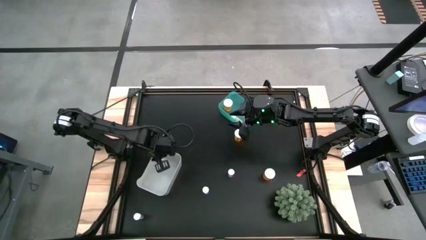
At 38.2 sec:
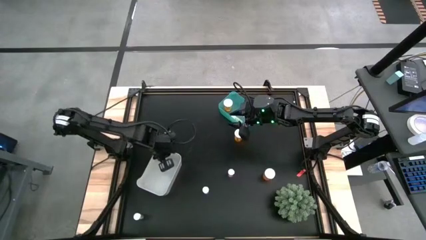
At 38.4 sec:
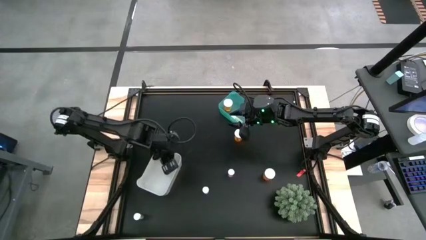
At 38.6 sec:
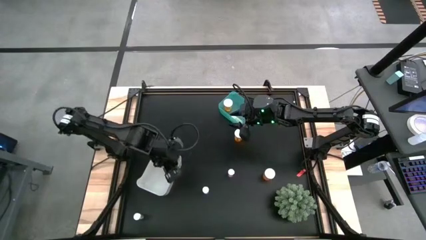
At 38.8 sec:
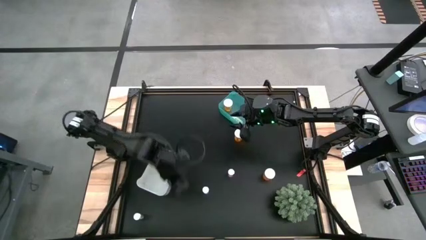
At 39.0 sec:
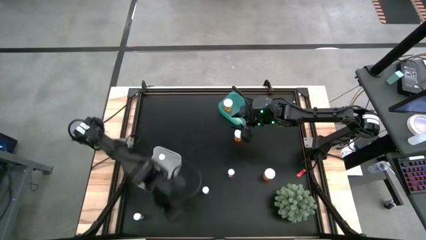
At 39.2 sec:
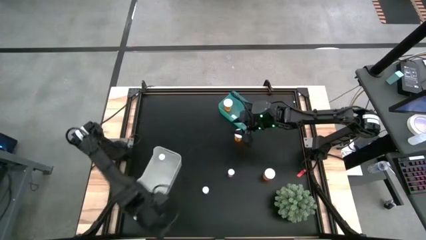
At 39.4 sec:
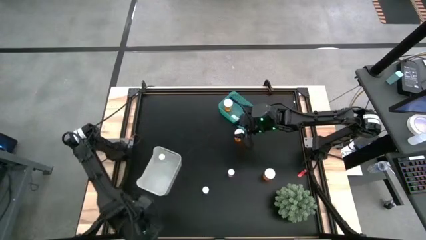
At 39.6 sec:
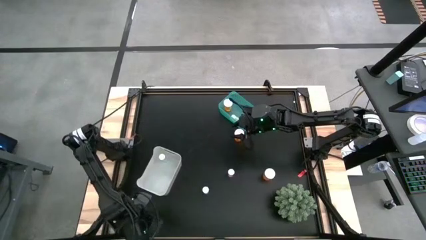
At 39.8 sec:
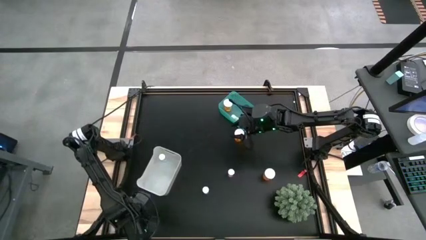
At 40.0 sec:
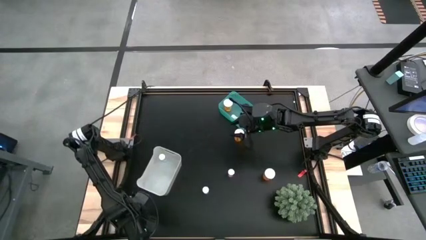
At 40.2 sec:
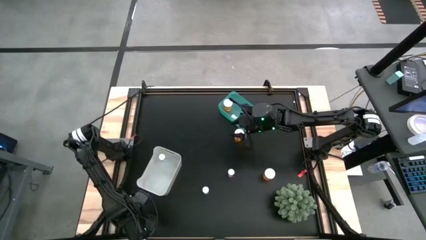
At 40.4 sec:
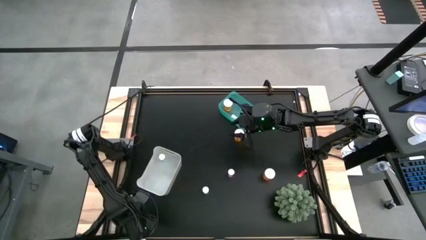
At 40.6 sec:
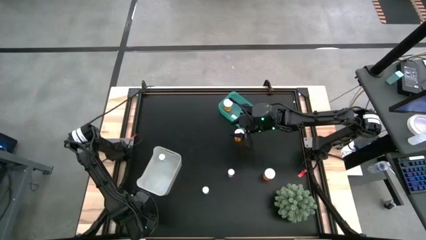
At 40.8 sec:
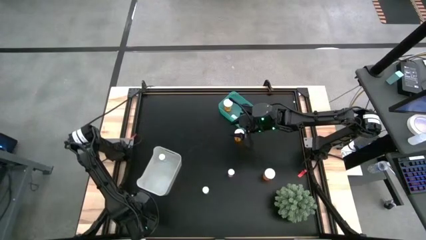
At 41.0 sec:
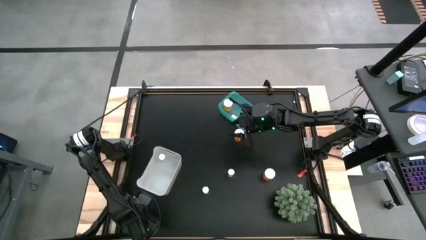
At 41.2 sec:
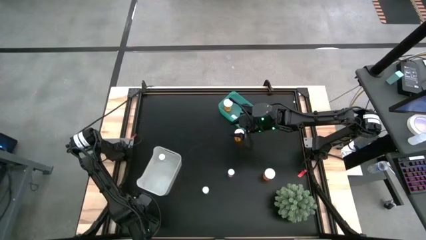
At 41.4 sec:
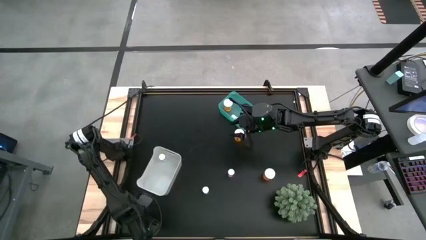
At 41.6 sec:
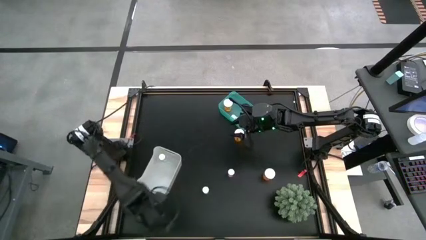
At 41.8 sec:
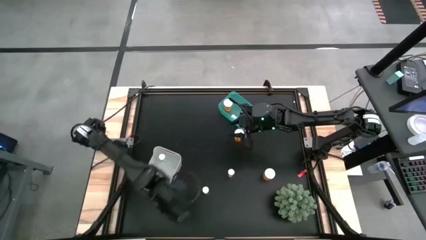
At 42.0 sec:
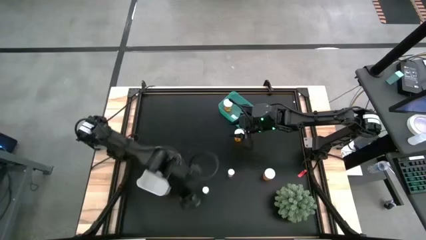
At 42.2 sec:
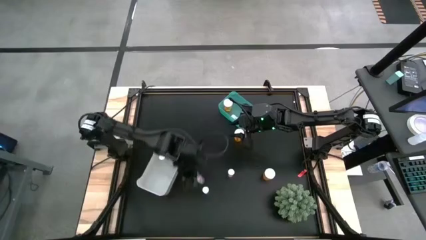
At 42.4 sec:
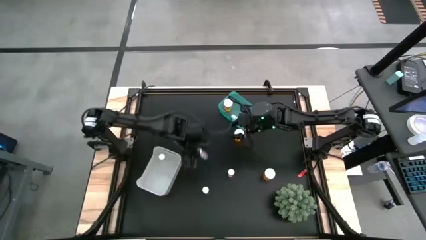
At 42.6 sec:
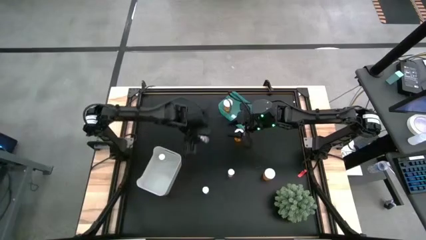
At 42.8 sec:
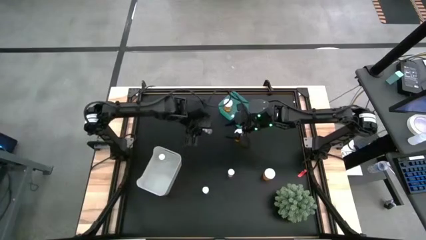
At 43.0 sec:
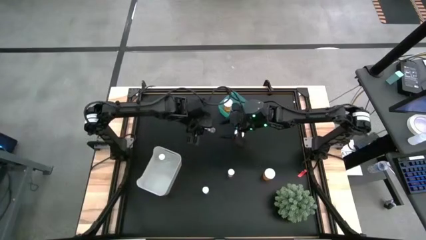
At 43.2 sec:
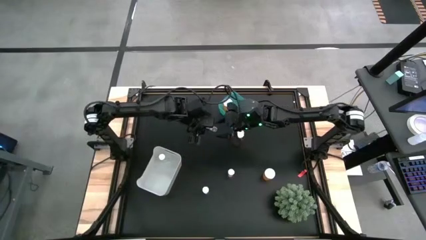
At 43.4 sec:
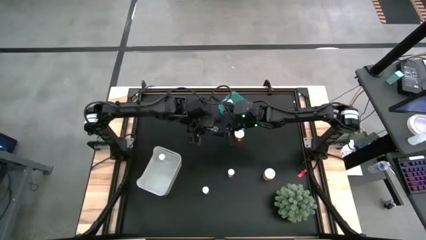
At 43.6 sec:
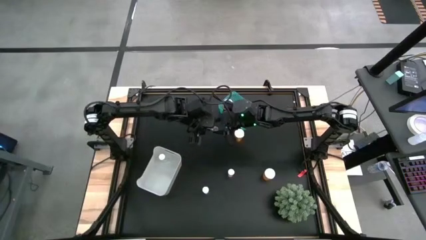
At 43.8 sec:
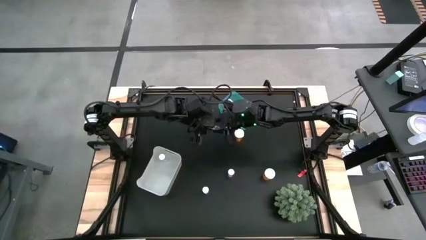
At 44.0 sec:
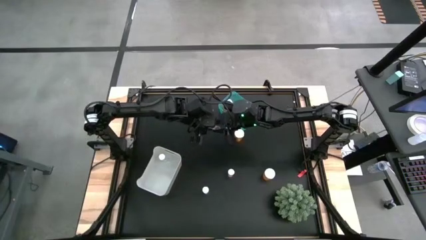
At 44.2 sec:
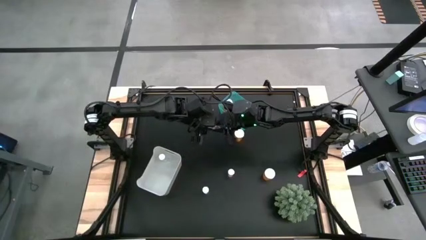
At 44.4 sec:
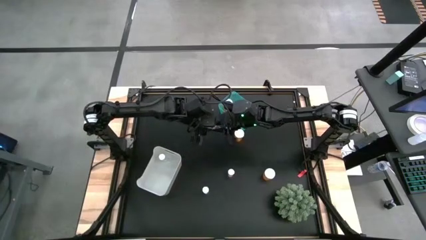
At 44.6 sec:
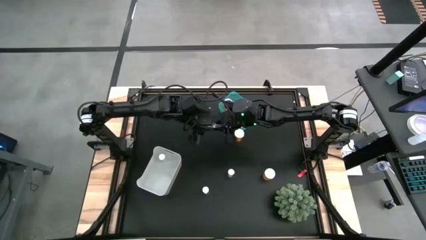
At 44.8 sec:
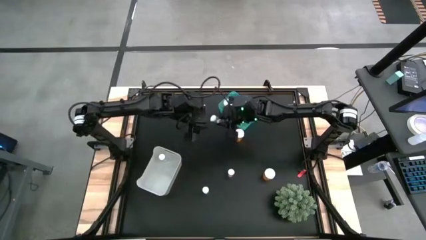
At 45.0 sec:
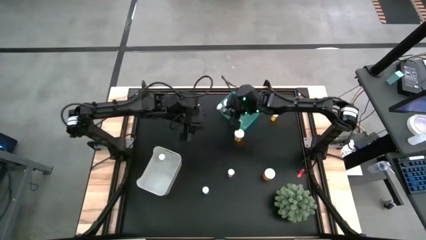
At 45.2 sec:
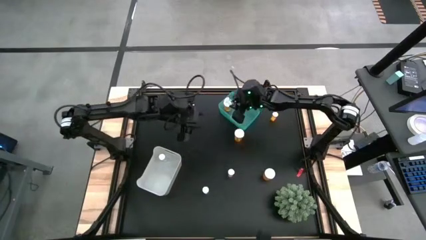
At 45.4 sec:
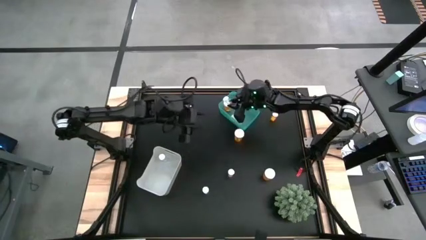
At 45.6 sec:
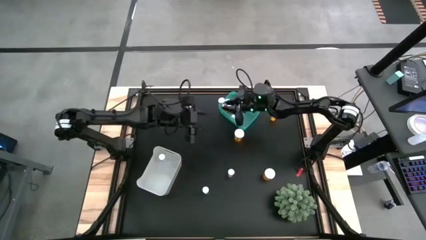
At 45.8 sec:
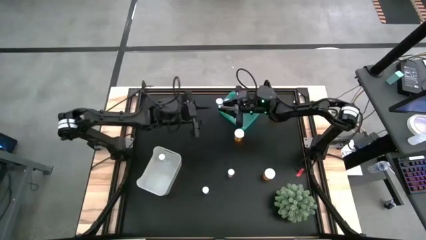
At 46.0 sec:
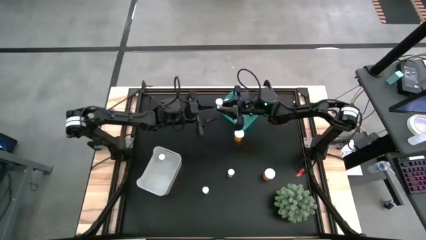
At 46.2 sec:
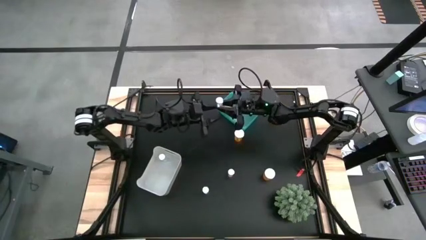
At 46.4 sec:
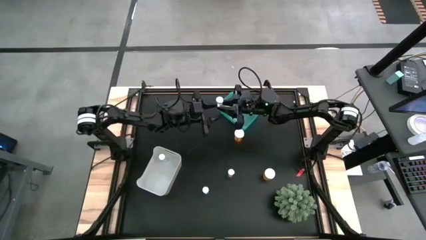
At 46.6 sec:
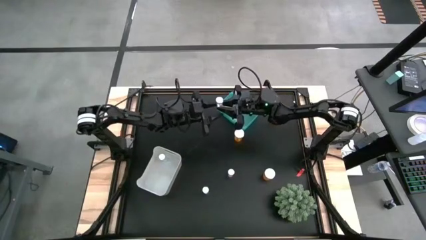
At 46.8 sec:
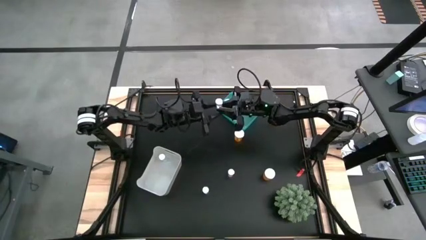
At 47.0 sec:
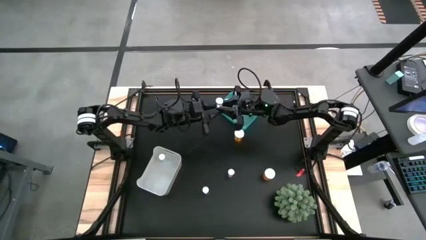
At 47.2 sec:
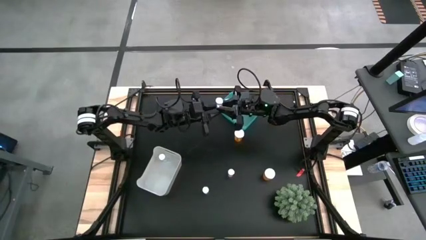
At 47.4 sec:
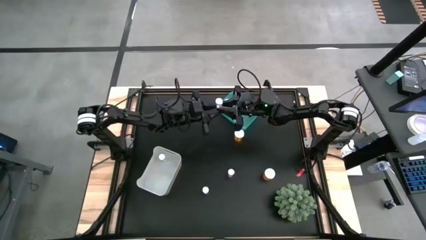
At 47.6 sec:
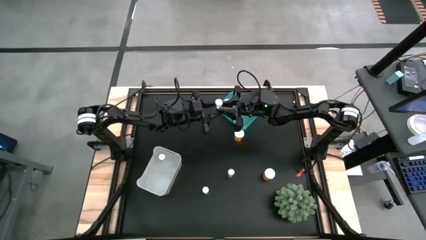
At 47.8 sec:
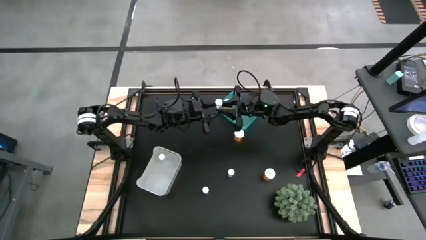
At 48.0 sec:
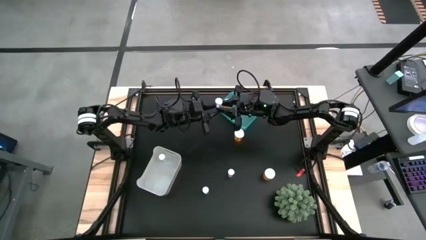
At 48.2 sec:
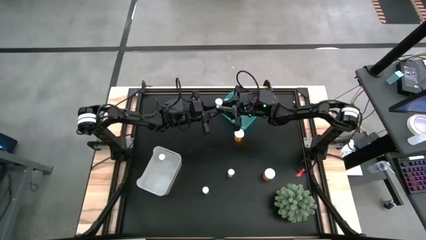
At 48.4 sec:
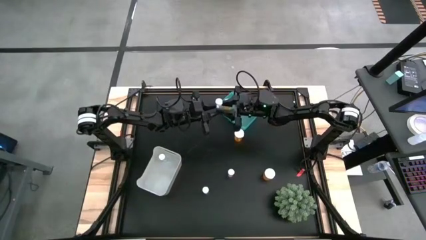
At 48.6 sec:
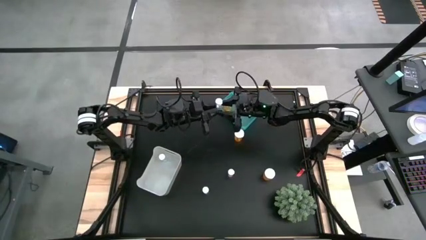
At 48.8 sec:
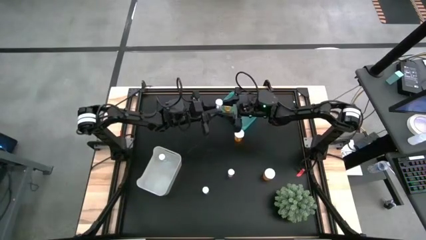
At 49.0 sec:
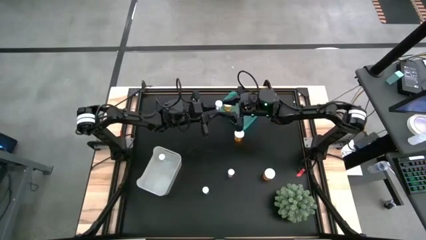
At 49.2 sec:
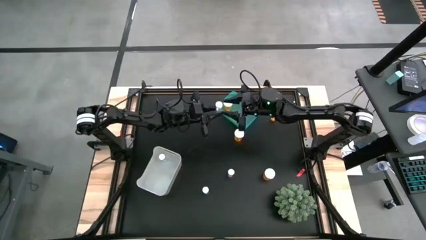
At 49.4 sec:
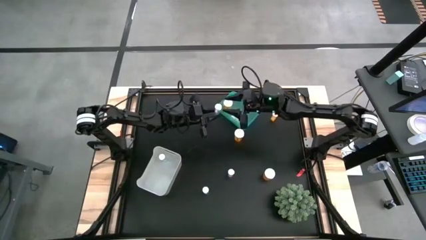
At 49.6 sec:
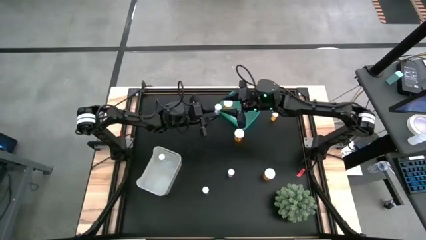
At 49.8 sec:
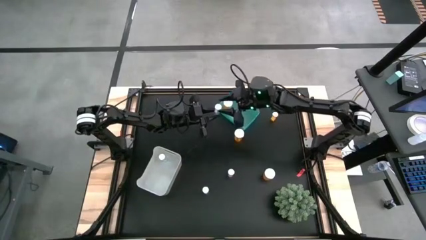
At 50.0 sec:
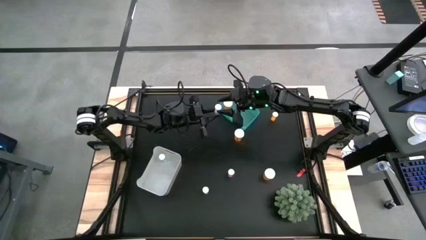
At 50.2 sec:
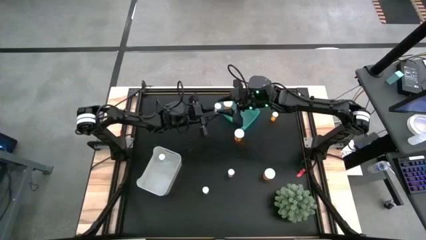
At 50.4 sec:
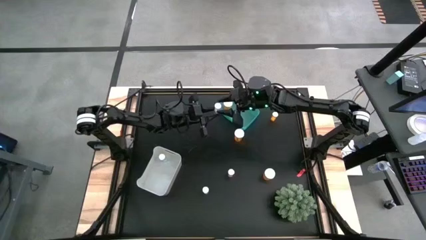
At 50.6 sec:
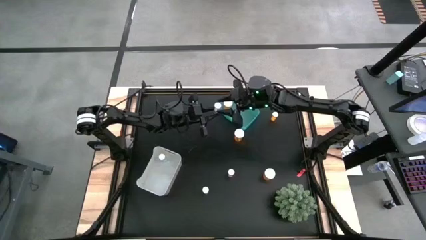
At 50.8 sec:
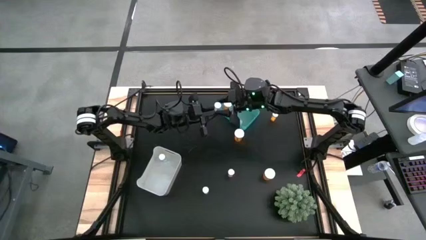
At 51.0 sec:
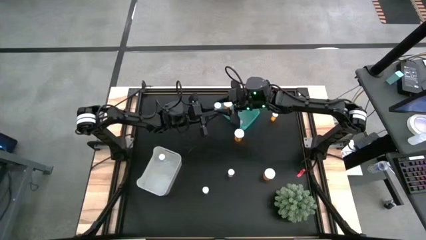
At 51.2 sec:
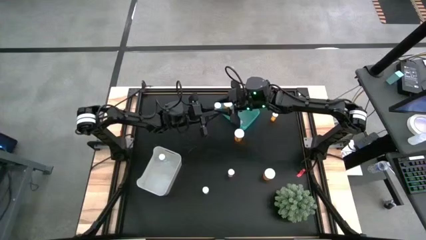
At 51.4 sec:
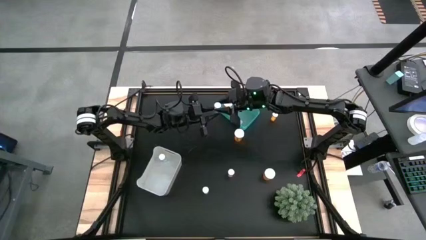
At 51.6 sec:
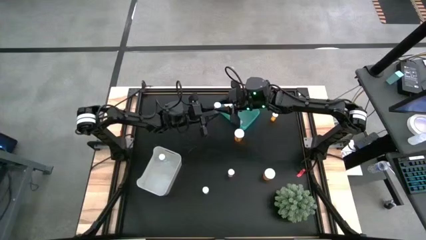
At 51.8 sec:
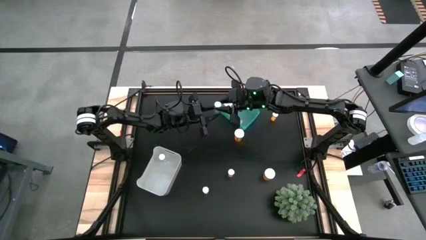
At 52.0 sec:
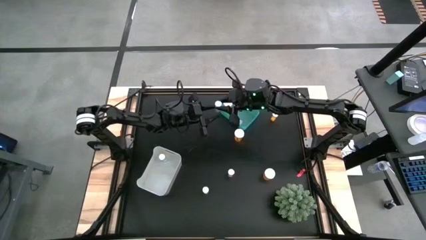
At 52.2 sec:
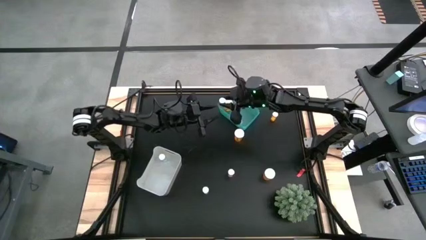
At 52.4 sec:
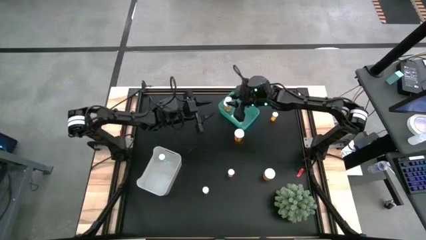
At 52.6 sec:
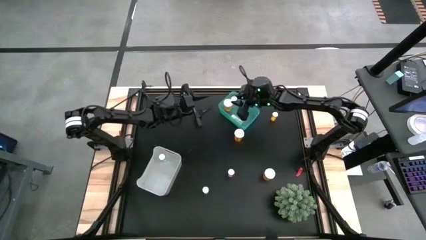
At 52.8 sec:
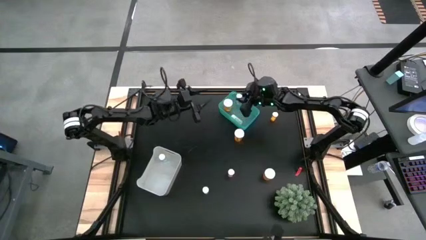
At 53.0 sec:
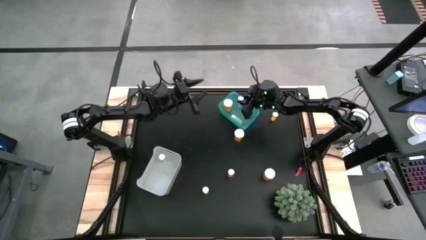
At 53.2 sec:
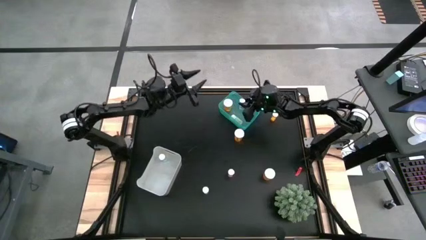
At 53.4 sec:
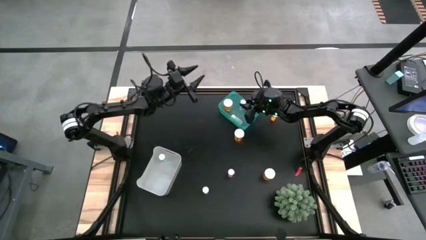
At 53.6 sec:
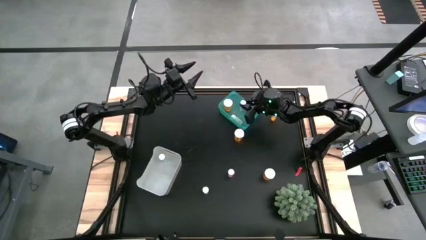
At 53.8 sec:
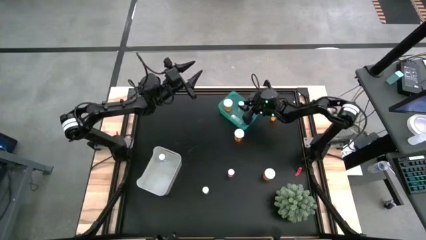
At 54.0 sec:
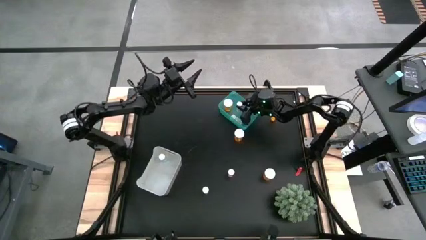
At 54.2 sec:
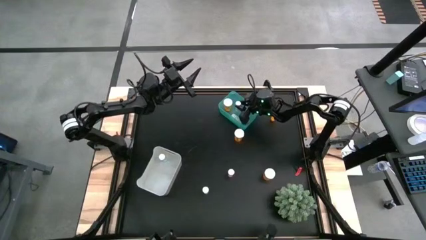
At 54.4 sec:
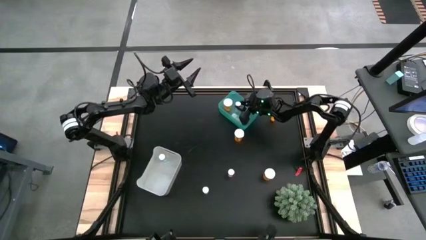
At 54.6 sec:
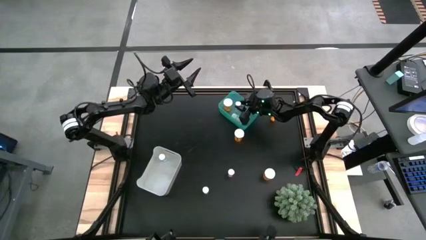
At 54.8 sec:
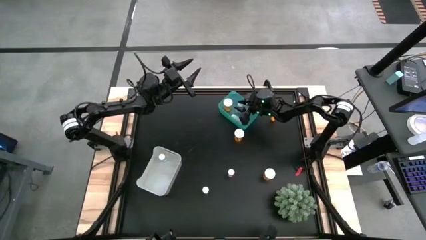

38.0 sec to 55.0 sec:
Task: Pick and place medicine bottles into bin by pill shape (circle, oval)
Put the left blue capsule bottle into the blue bin
